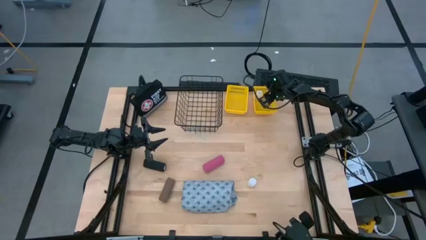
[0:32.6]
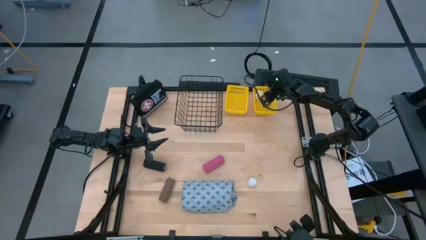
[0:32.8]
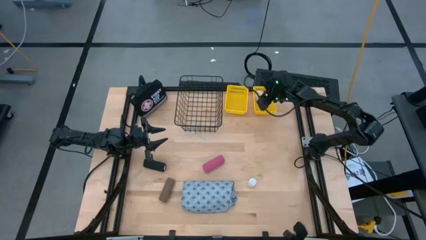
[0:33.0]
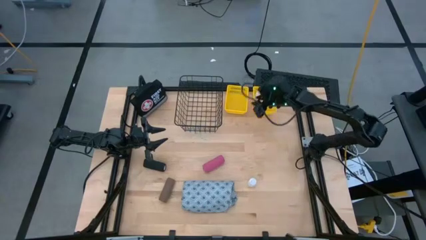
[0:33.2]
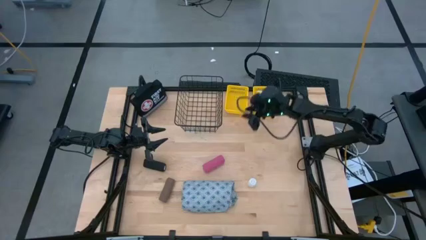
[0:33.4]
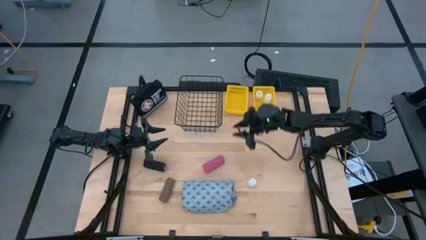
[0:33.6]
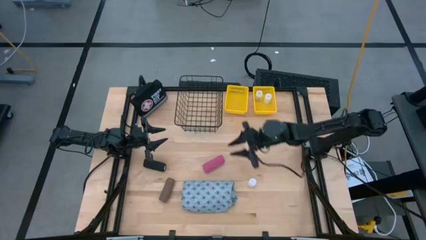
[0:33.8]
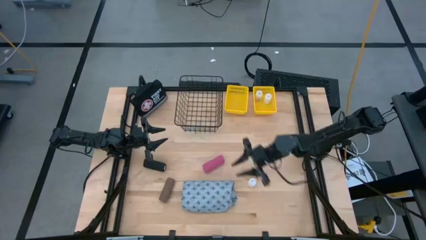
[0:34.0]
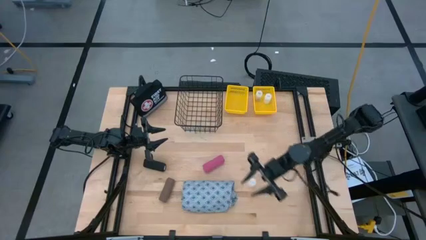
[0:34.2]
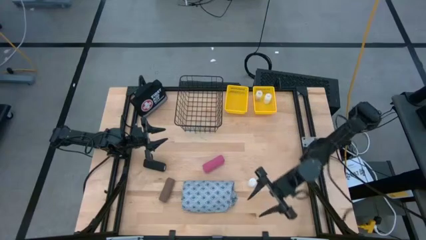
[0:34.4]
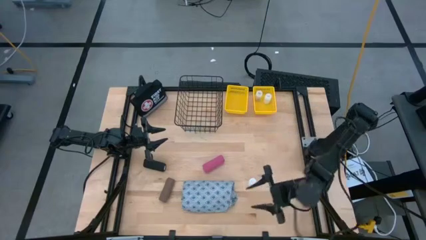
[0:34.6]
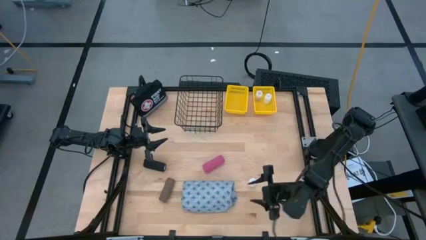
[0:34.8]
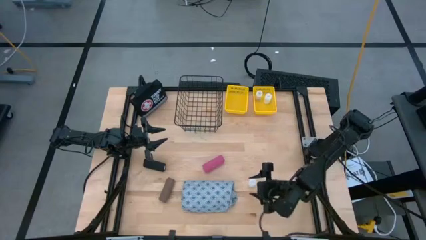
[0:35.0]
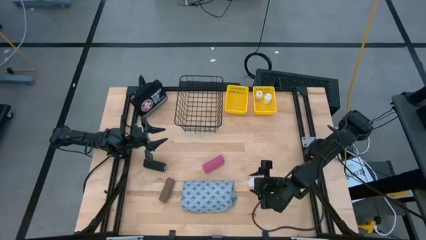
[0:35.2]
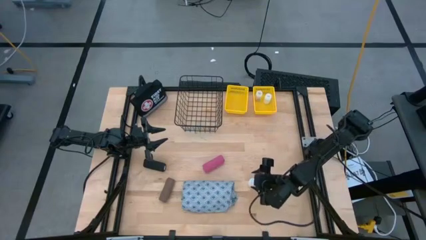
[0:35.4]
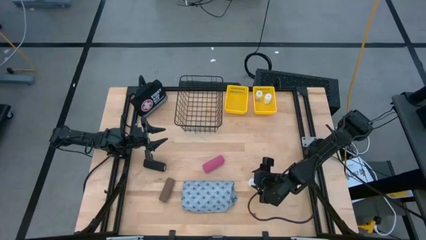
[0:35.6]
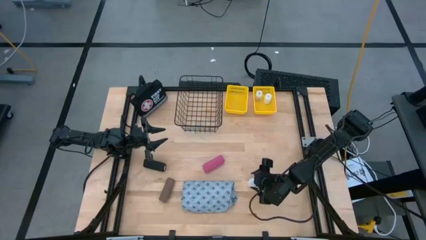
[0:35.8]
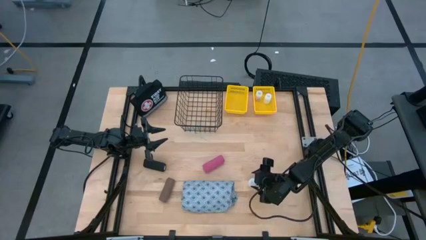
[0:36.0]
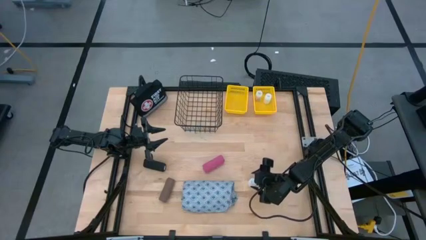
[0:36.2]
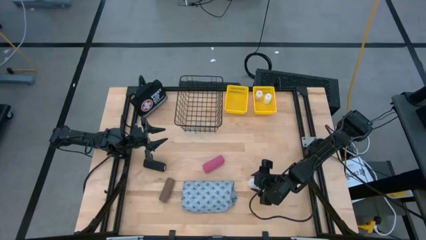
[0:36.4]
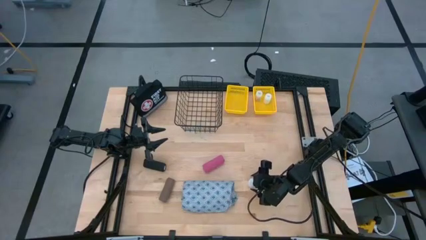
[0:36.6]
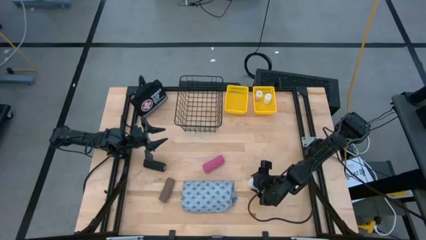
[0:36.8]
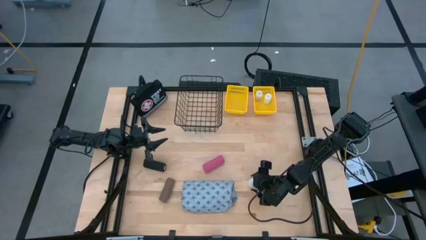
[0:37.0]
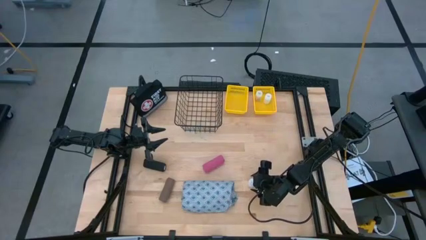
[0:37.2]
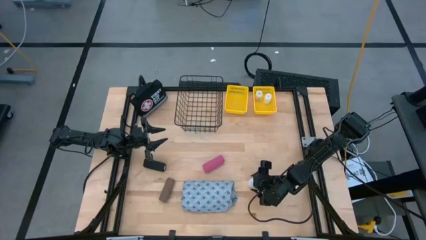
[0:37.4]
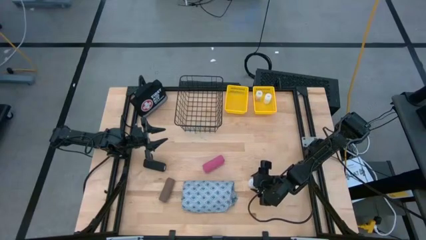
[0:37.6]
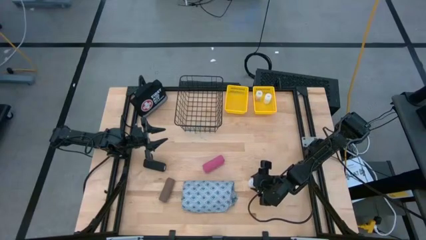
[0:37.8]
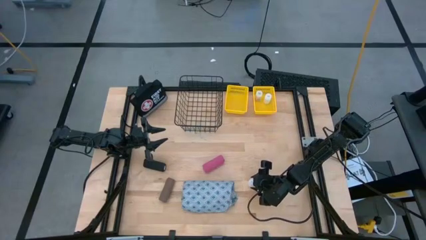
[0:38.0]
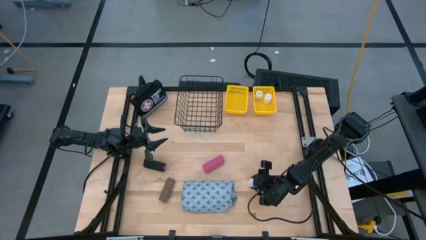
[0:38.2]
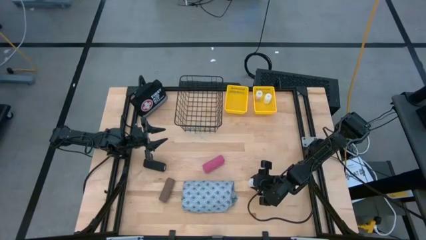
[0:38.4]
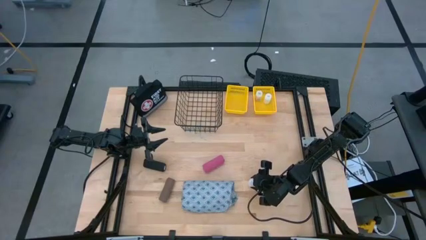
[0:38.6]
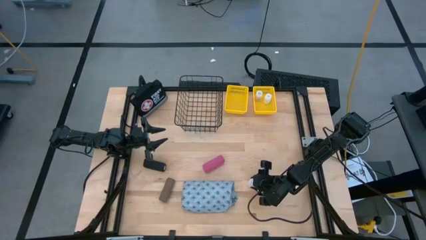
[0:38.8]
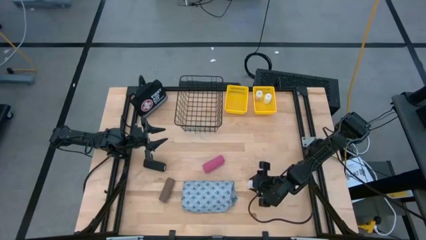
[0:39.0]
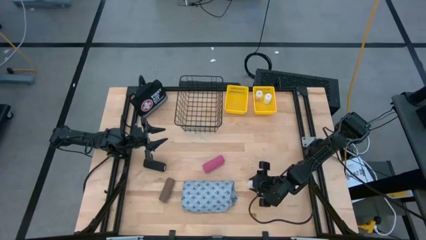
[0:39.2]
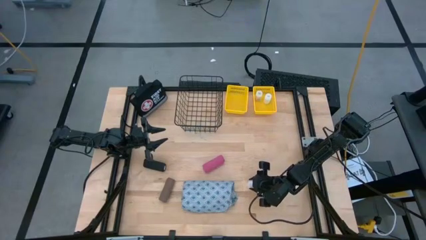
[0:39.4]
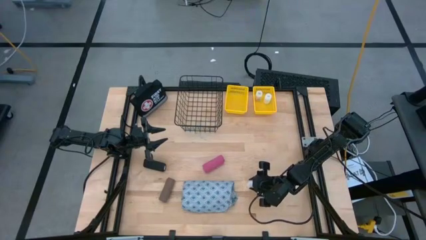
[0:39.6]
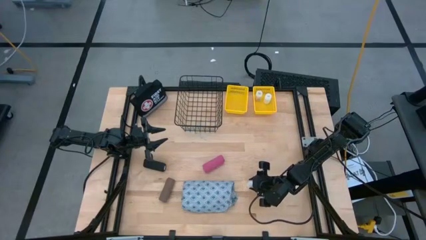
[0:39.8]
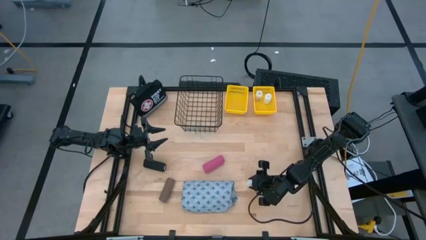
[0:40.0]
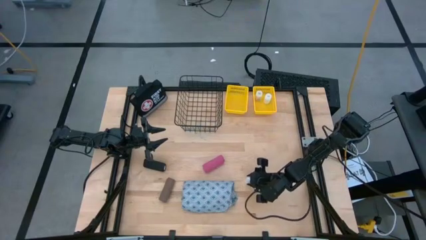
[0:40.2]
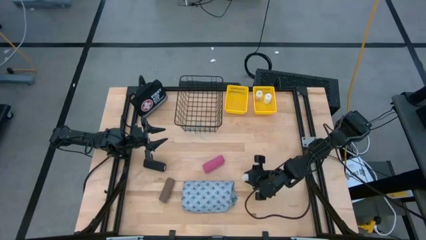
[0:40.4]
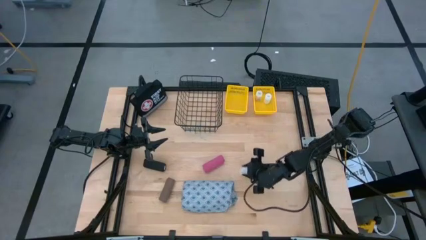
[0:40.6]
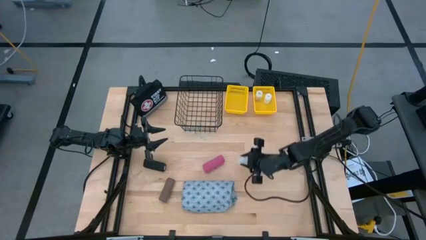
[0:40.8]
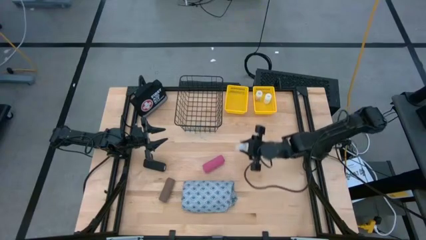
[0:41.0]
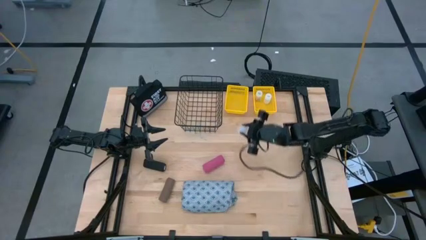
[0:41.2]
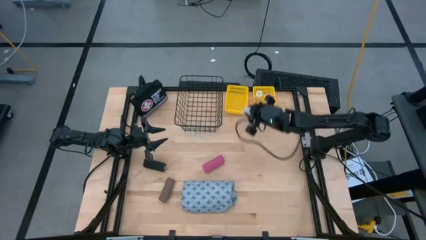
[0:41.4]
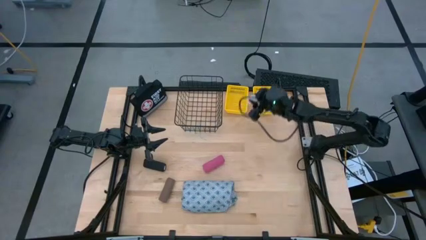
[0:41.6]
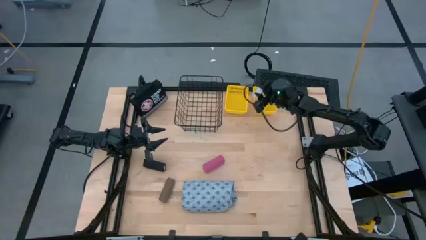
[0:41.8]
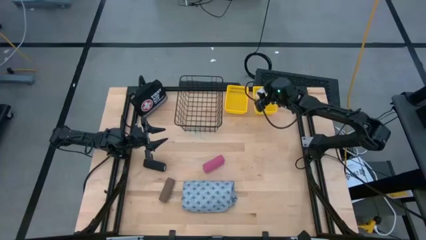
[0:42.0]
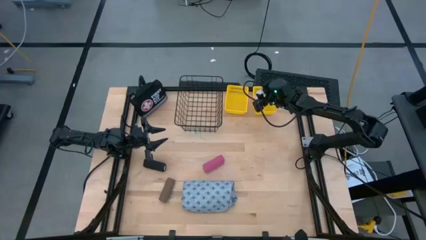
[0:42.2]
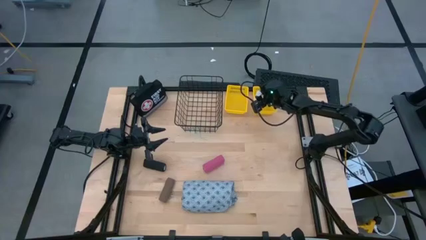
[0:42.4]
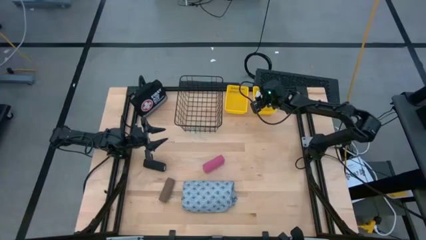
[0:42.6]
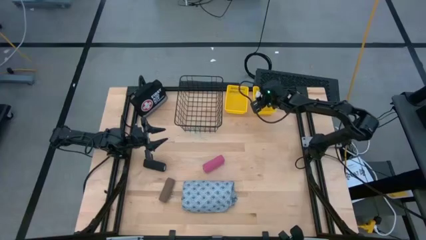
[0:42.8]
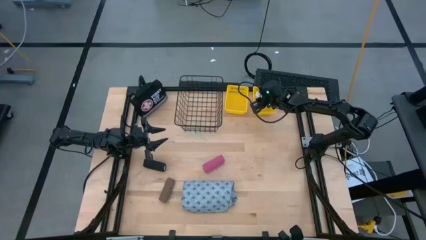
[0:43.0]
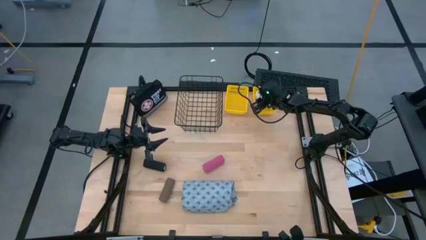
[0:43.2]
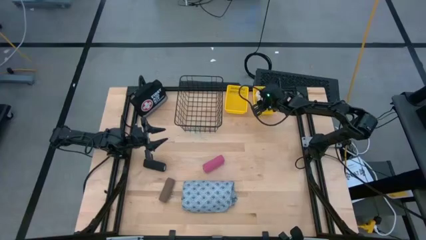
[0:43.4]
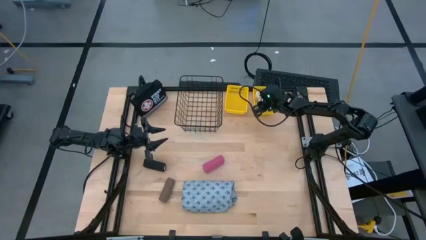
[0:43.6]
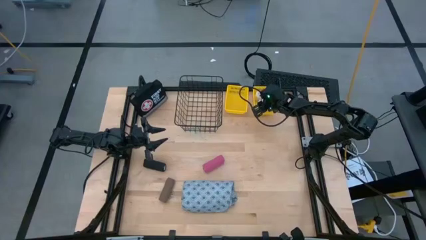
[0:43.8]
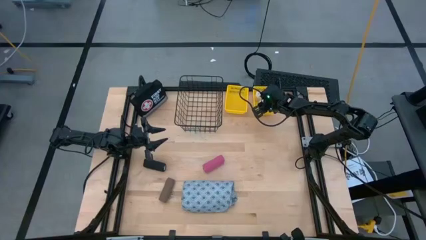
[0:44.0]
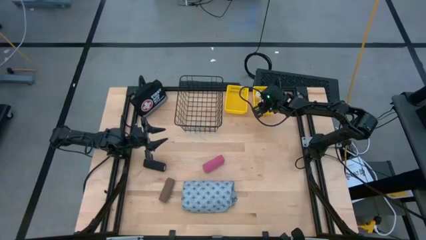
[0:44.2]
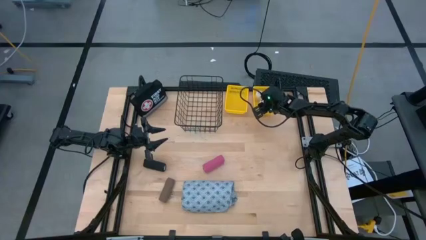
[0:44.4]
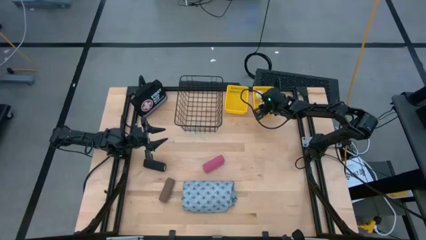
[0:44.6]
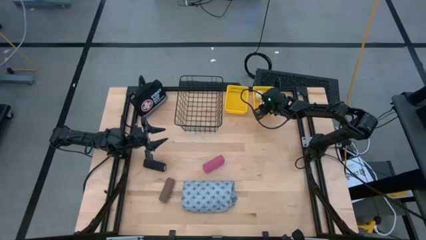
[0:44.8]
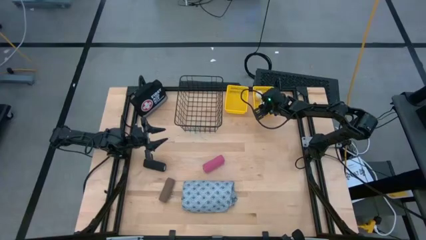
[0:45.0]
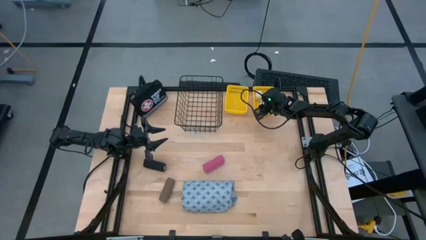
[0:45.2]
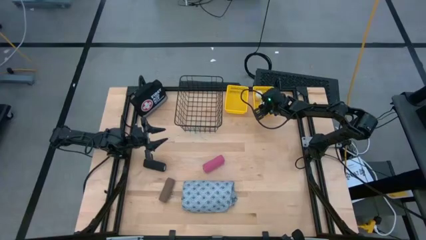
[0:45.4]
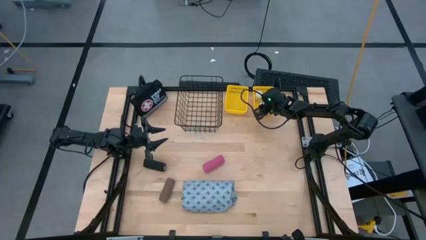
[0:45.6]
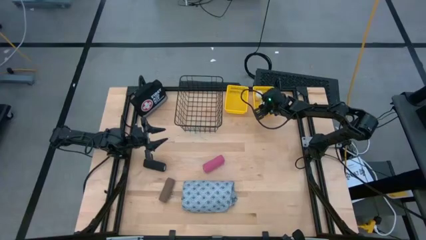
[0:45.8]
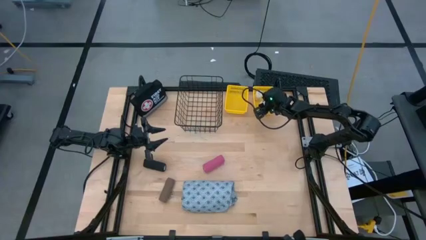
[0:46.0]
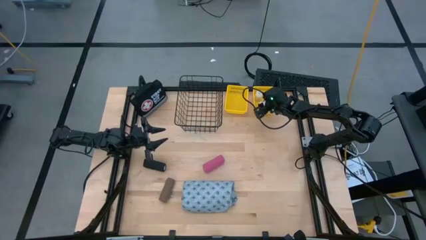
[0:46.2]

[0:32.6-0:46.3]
Task: Pick & Place Medicine items
Put the white medicine bottle into the right yellow basket

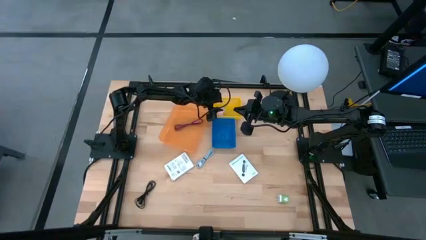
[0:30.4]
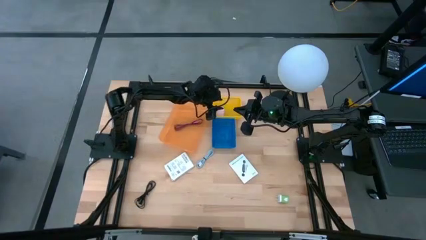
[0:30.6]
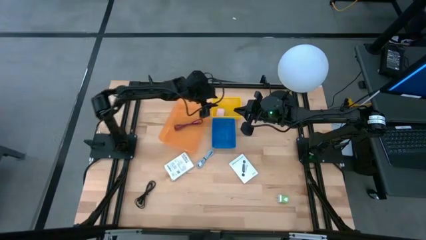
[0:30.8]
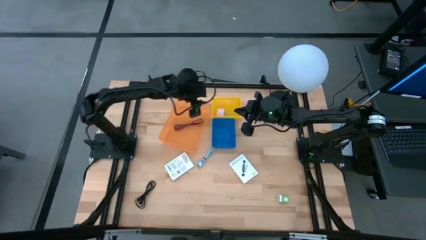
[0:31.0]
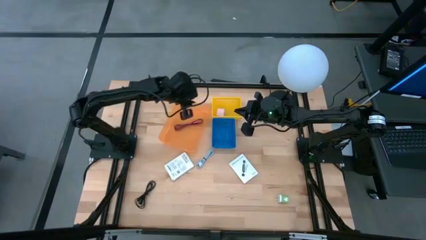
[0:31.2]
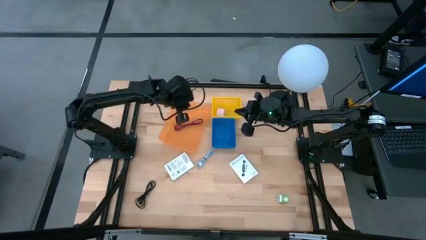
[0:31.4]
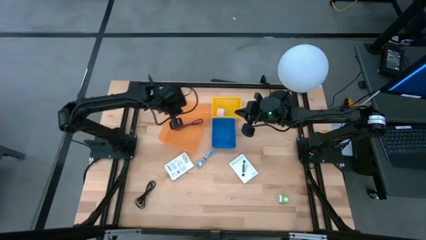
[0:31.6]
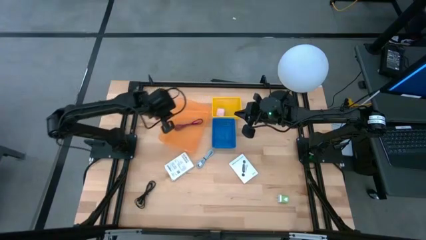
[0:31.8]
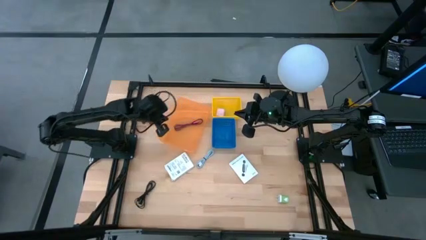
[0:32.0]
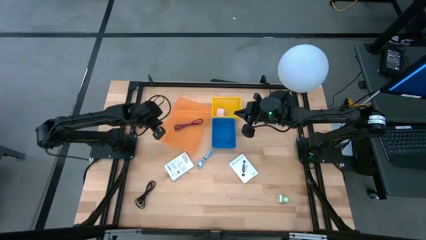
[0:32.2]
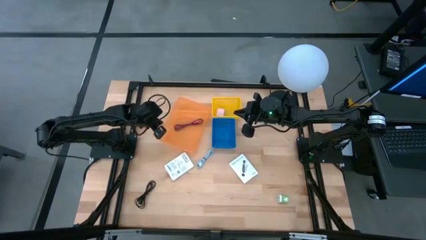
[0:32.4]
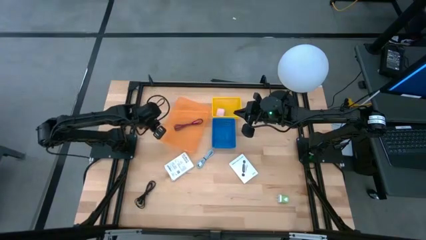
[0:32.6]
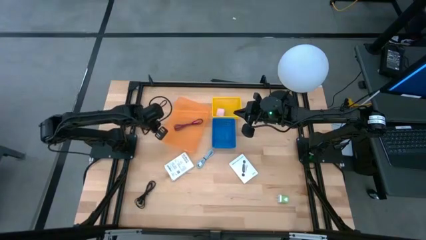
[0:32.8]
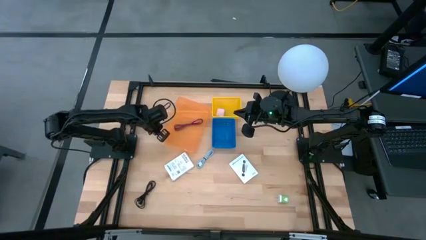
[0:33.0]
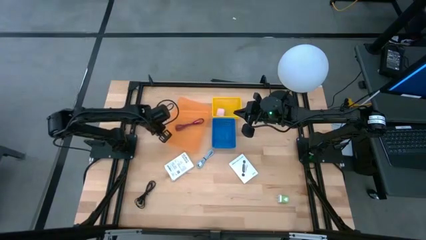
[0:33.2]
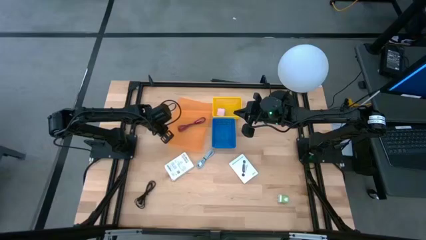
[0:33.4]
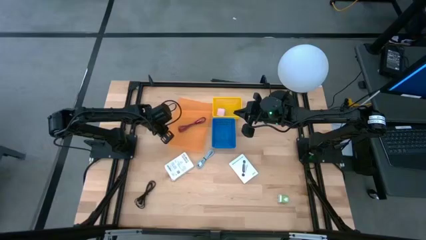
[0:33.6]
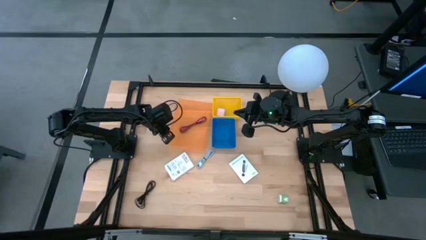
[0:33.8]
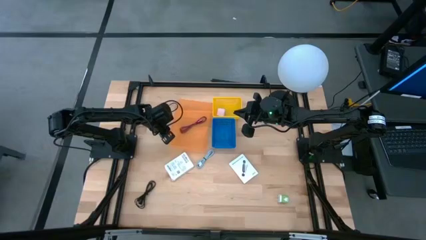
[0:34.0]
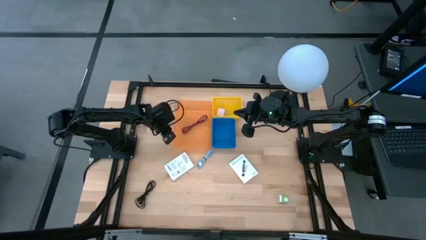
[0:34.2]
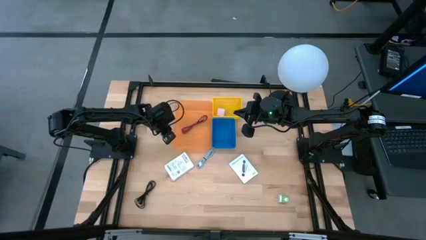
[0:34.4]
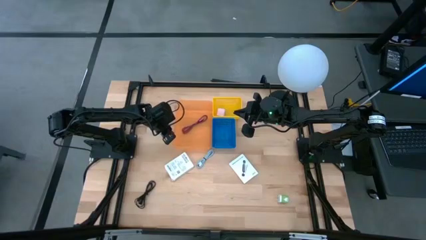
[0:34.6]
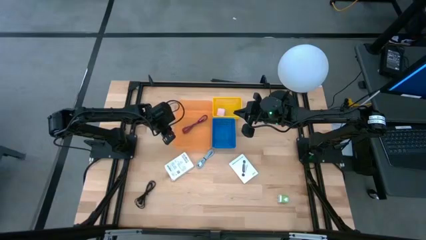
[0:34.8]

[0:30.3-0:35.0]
Task: Pick and place items into bin
Adjust the orange bin
